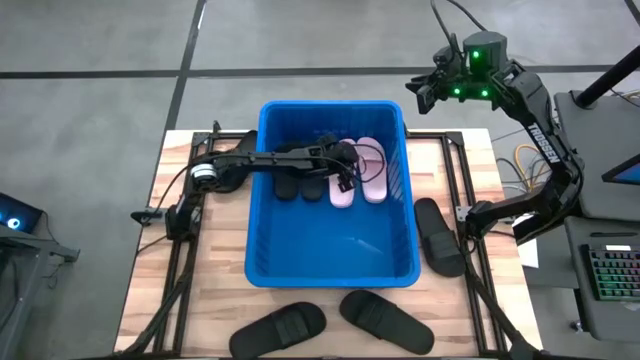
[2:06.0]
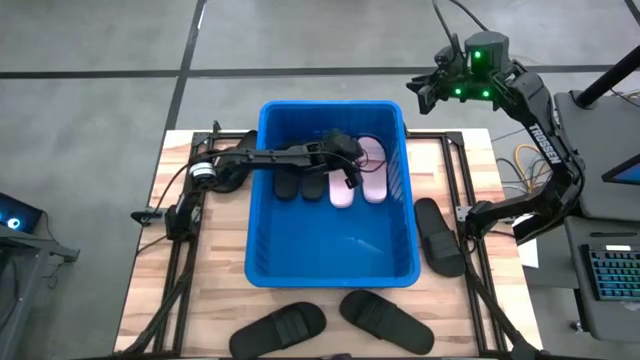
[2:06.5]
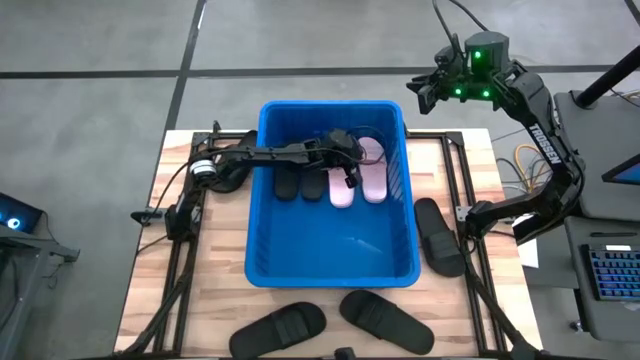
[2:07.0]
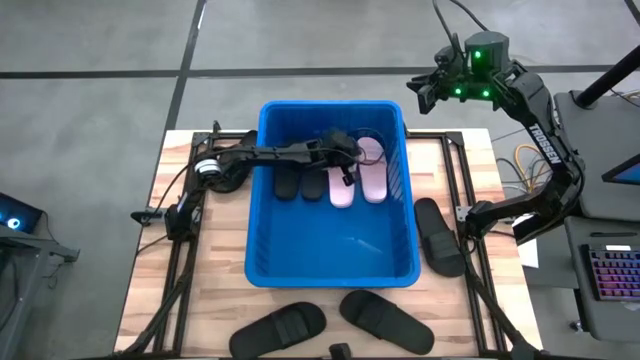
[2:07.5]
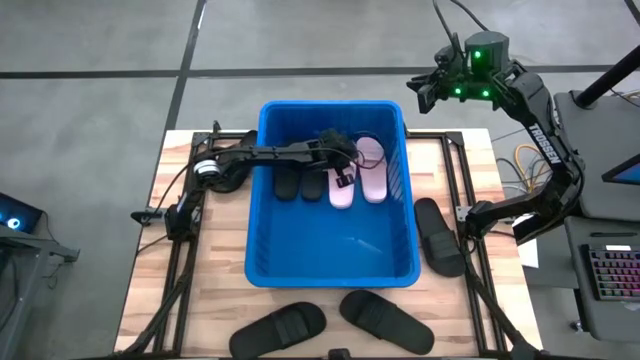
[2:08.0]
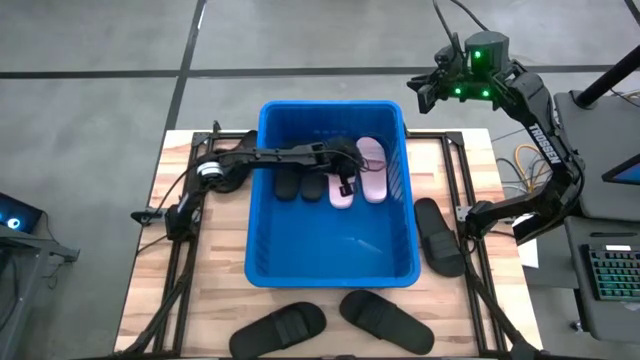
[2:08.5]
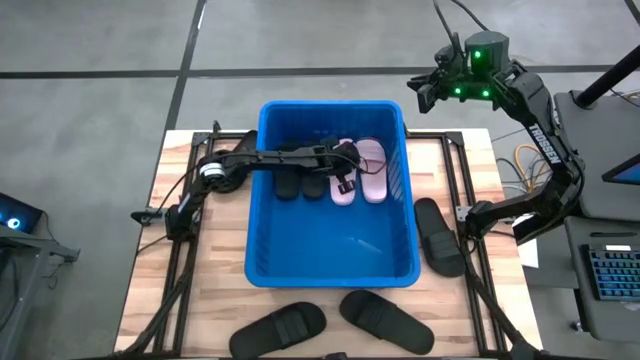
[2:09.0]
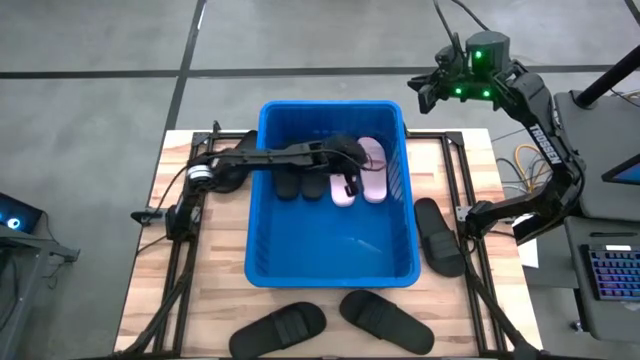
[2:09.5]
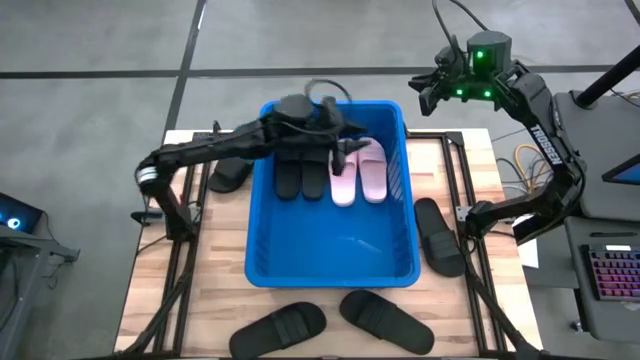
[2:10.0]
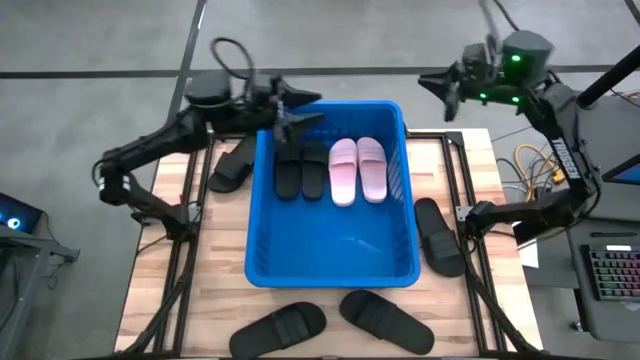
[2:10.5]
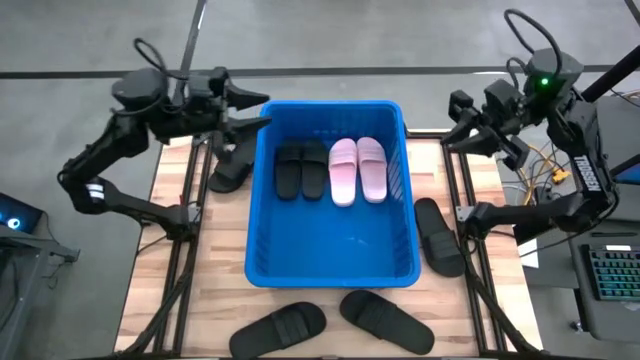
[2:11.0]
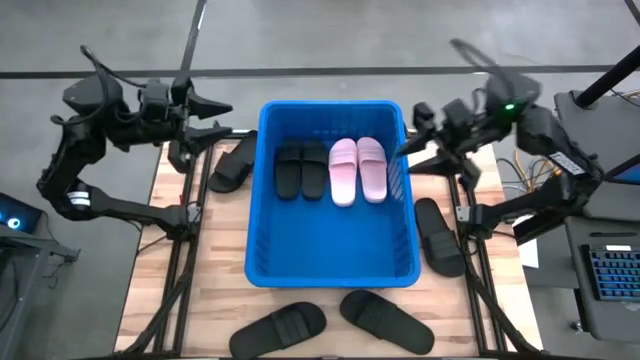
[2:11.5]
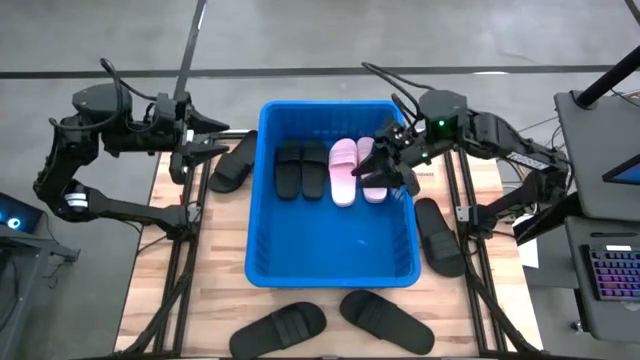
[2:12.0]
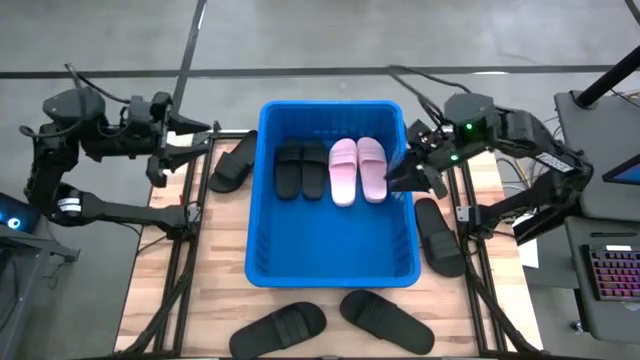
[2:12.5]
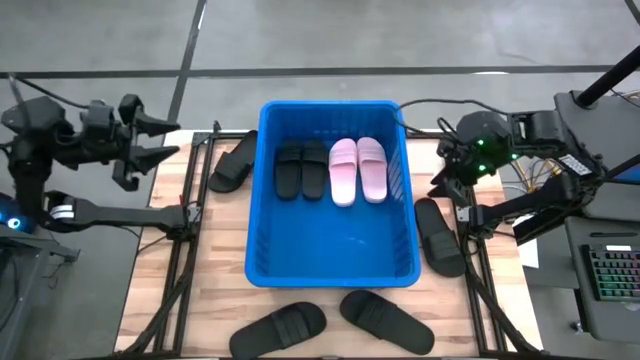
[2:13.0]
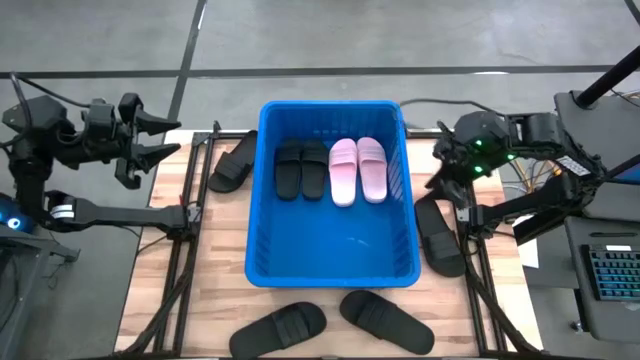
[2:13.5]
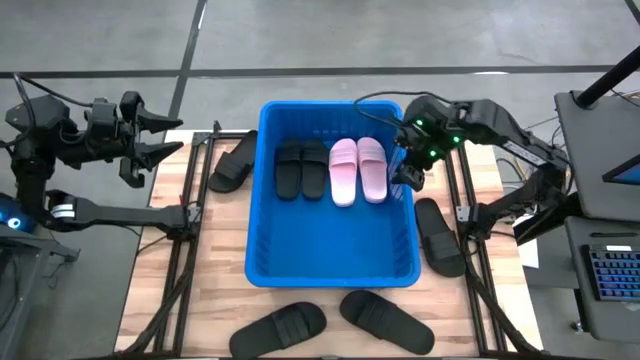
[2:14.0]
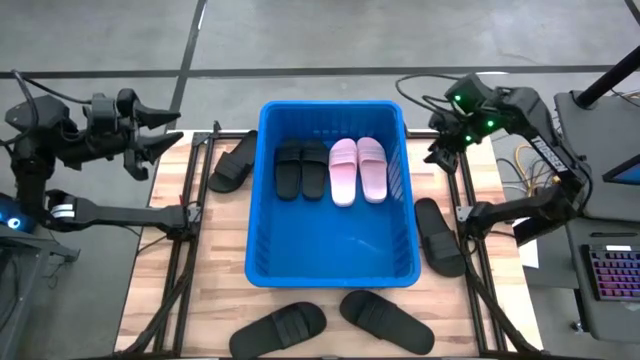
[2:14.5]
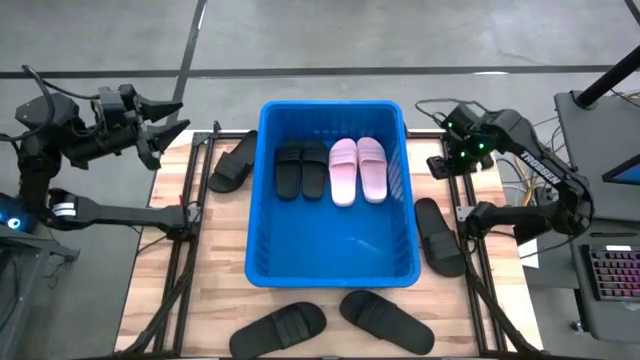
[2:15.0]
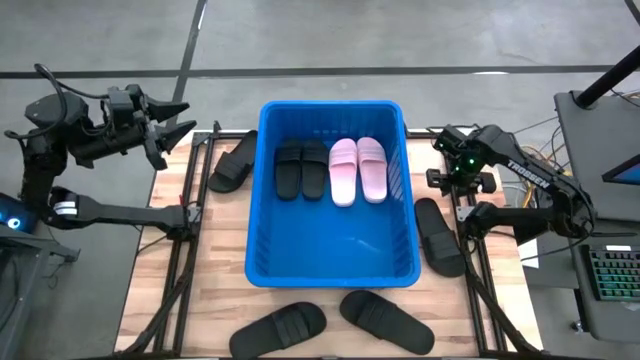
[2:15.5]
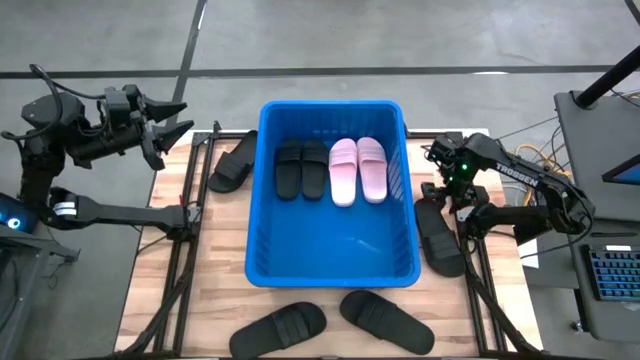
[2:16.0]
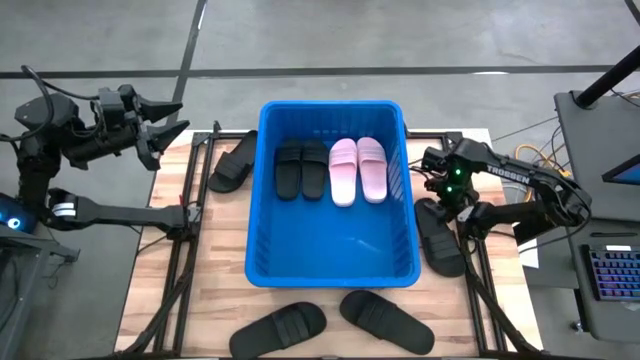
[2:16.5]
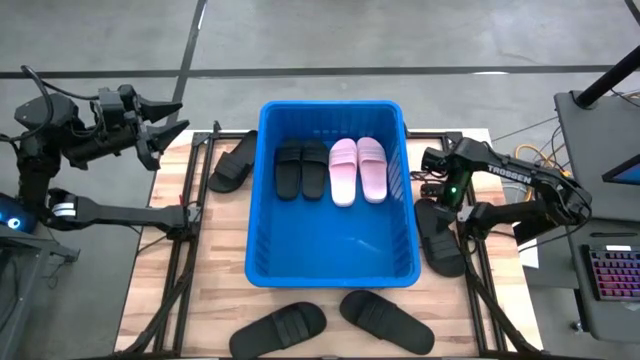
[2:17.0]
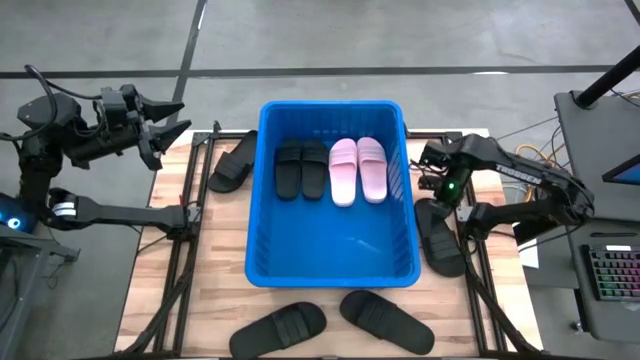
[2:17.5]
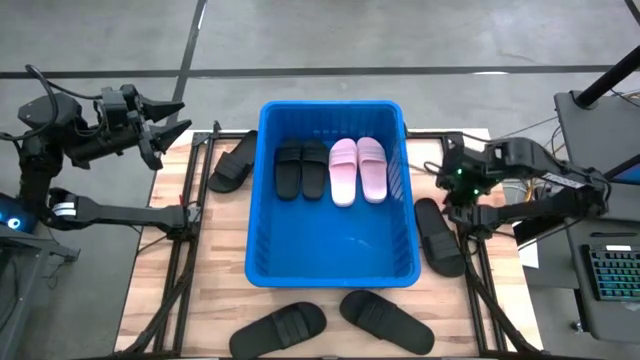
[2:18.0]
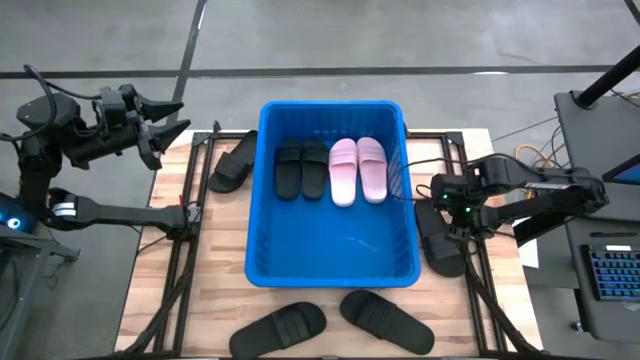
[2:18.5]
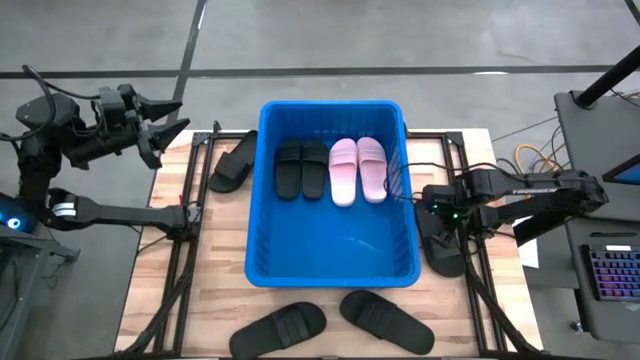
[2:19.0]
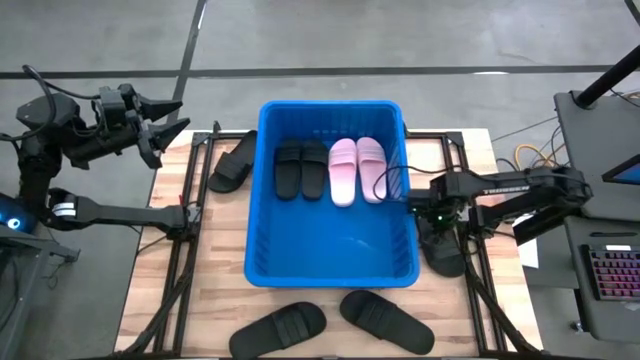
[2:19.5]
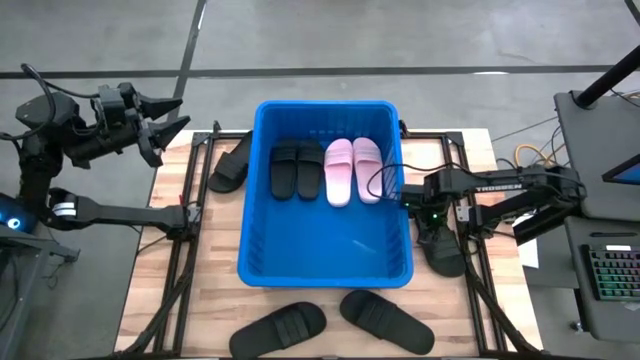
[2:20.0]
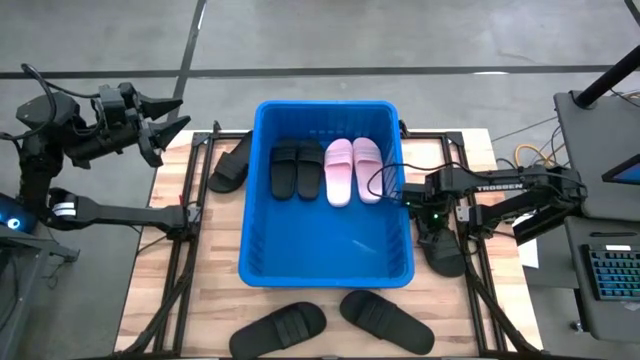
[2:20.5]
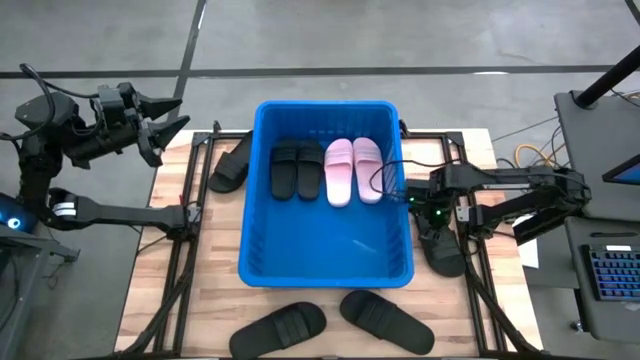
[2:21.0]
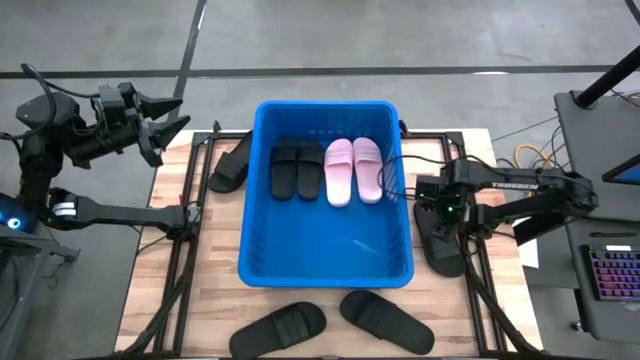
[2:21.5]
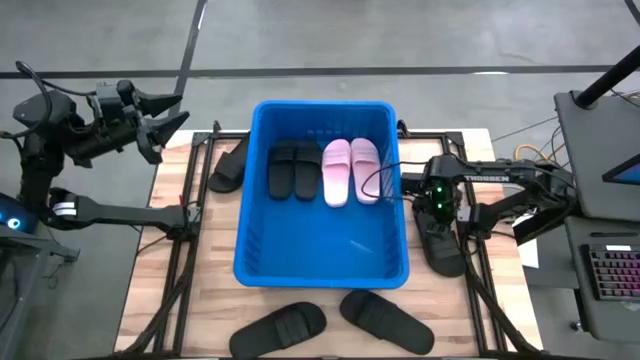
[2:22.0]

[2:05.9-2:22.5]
Task: Pick and place slides into bin
Put the black slide into the blue bin

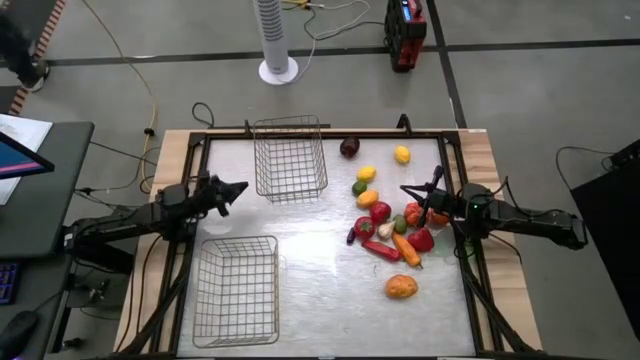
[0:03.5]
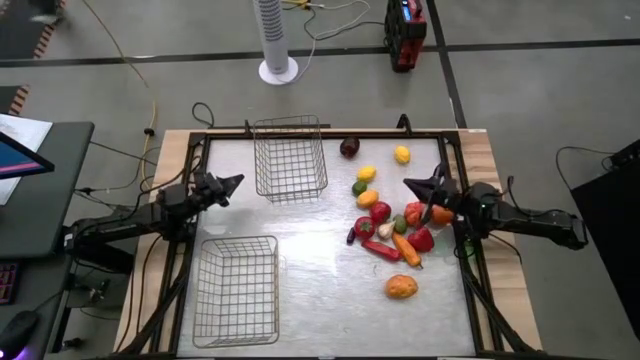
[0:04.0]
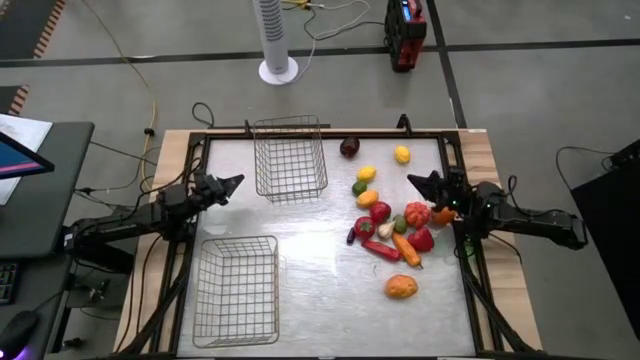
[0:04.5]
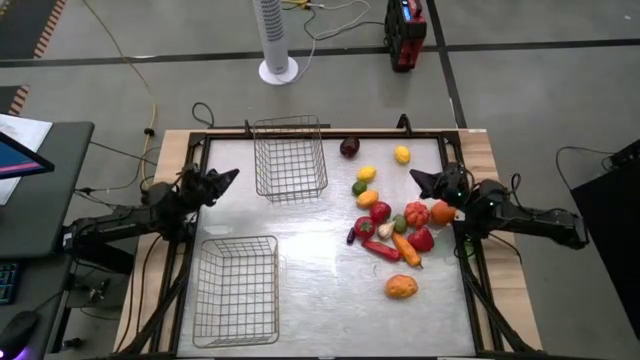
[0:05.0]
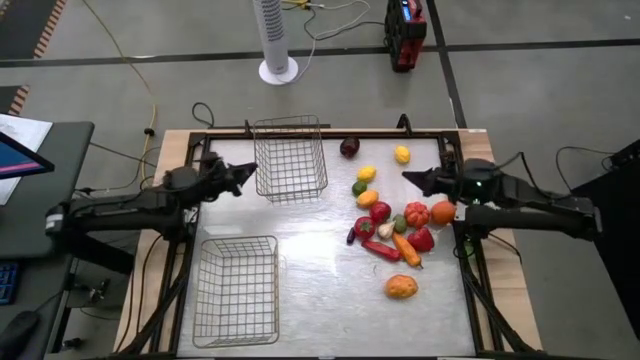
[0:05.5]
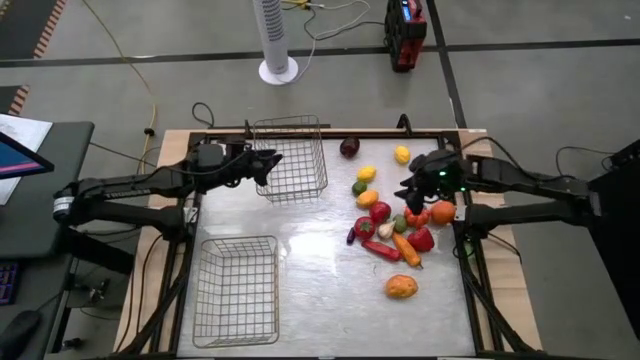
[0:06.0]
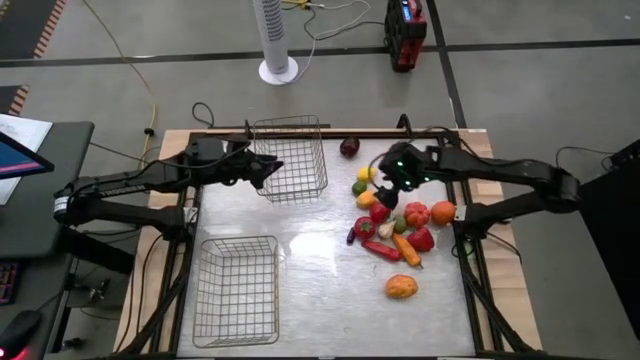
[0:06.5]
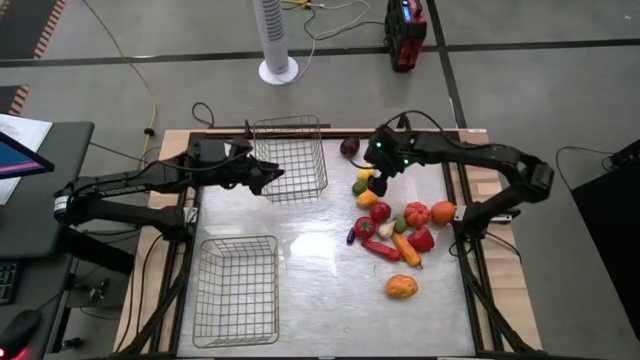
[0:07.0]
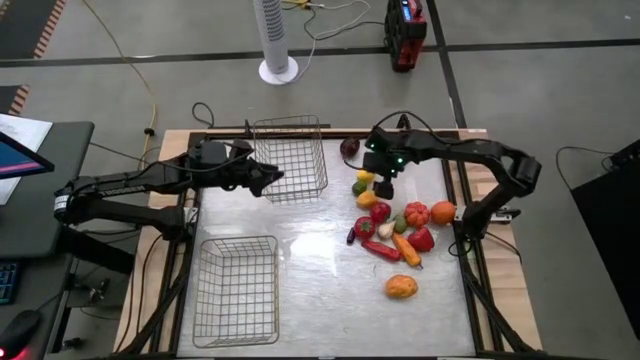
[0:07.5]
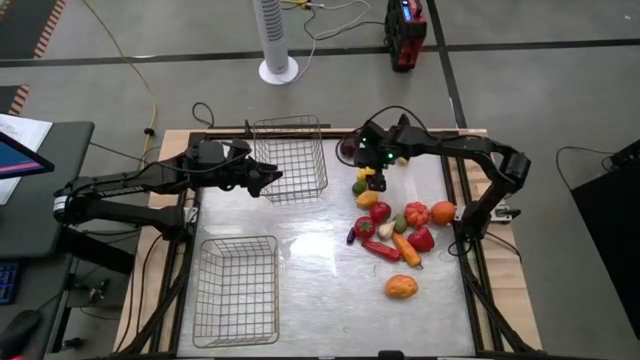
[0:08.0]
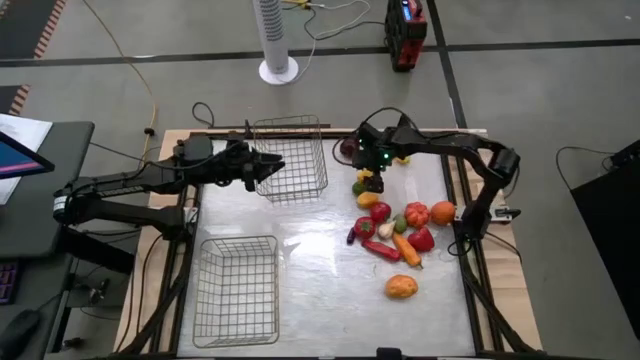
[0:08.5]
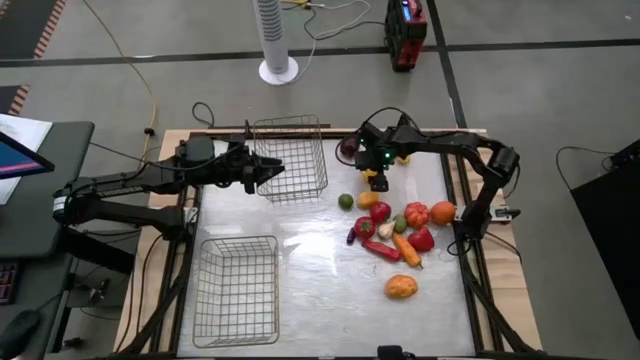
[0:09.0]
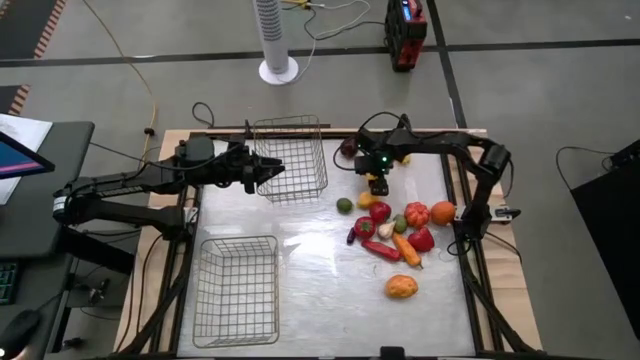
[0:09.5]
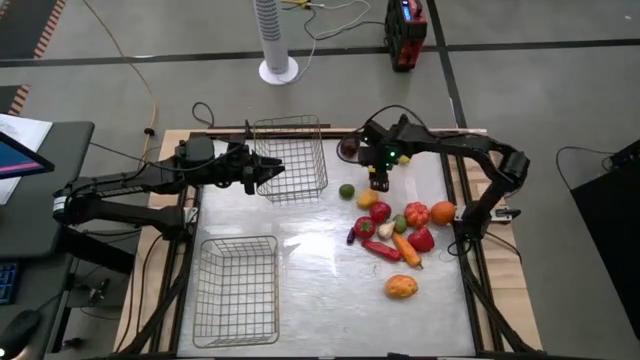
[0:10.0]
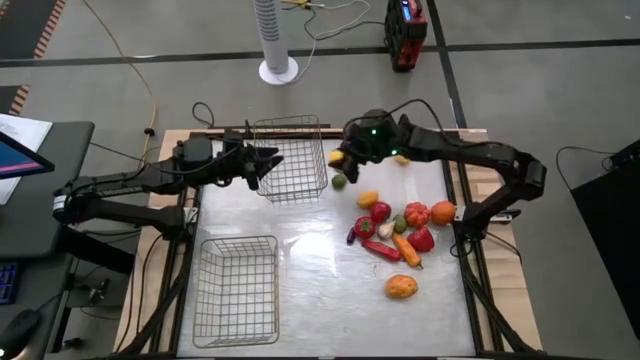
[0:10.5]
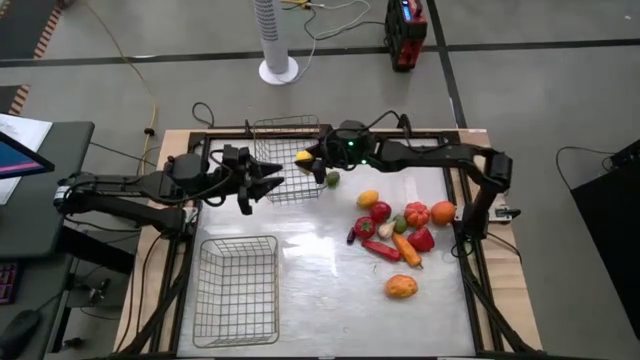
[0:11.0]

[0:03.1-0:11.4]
Task: Sort produce into baskets
Put the middle yellow lemon into the top wire basket
